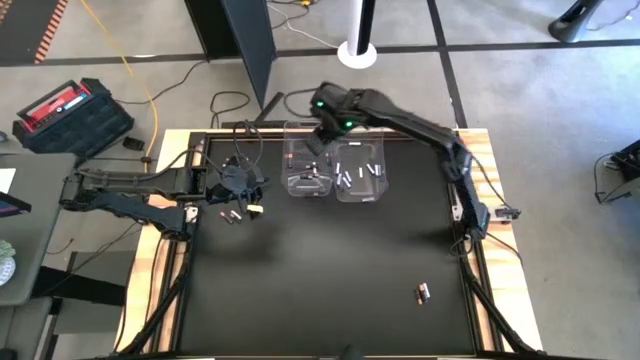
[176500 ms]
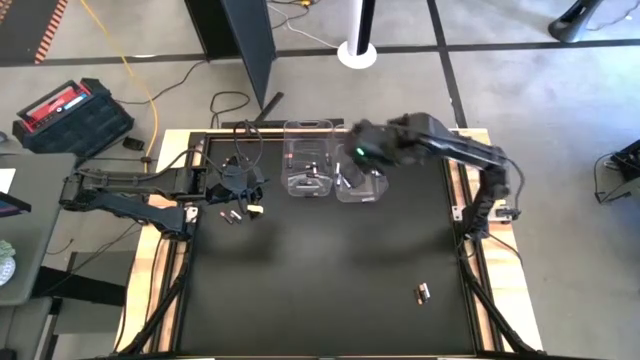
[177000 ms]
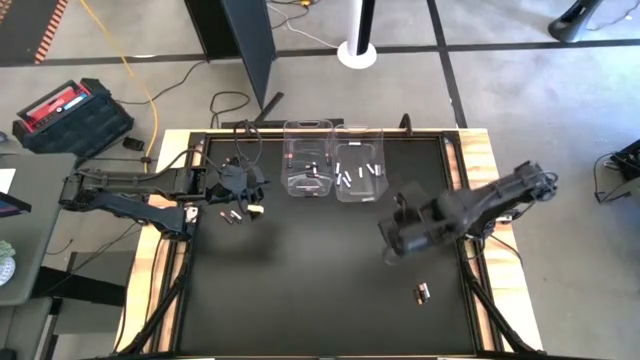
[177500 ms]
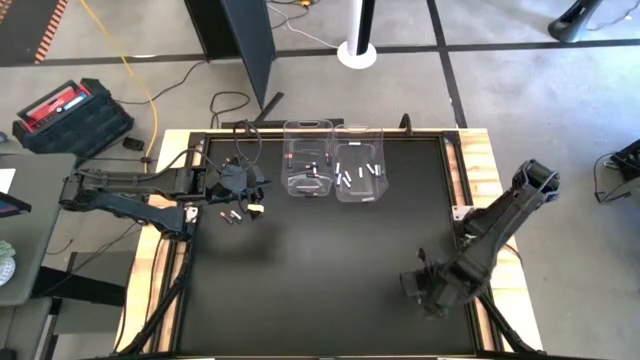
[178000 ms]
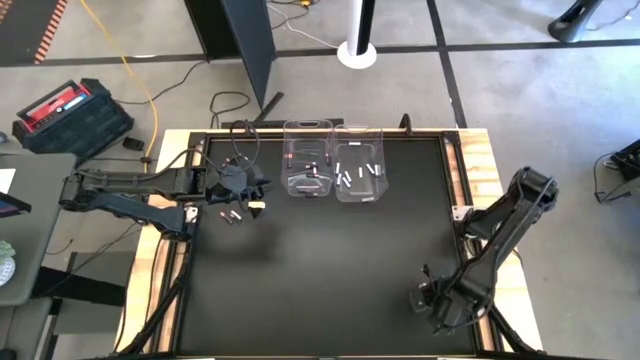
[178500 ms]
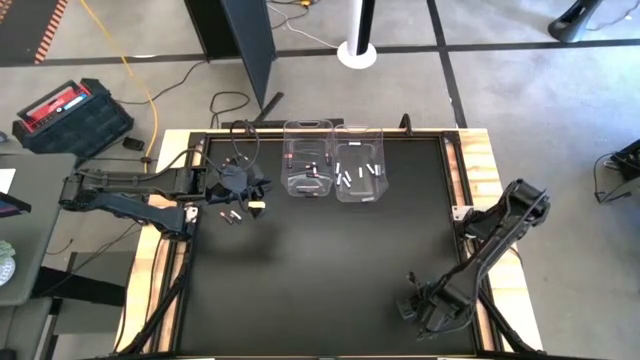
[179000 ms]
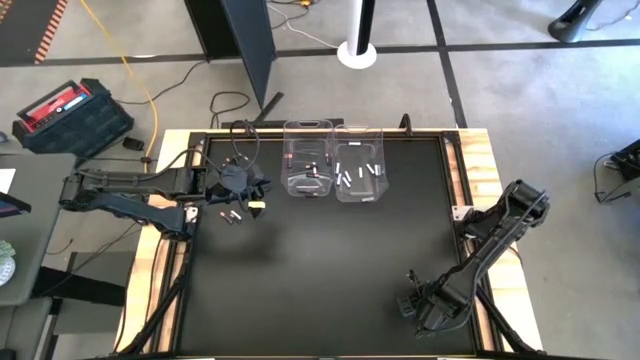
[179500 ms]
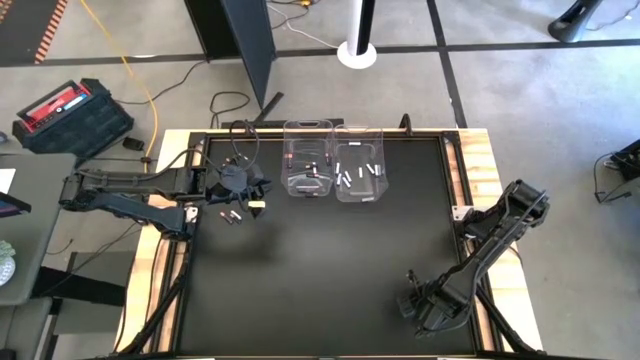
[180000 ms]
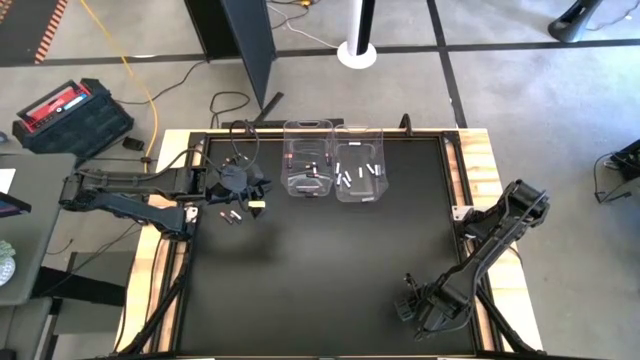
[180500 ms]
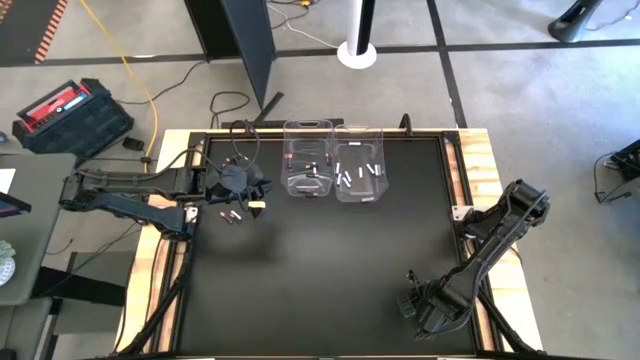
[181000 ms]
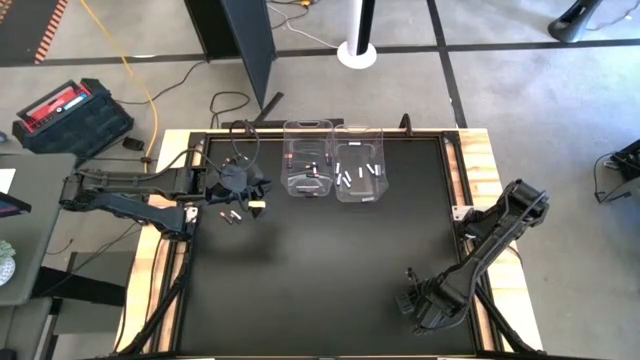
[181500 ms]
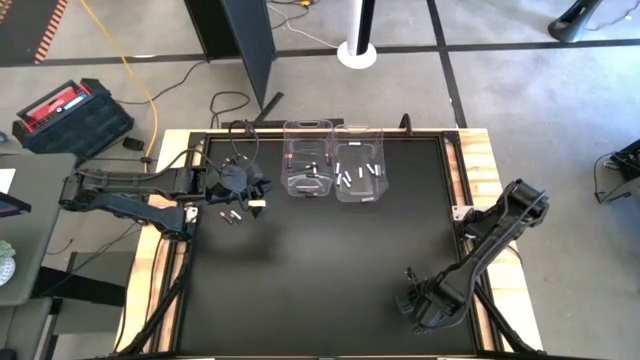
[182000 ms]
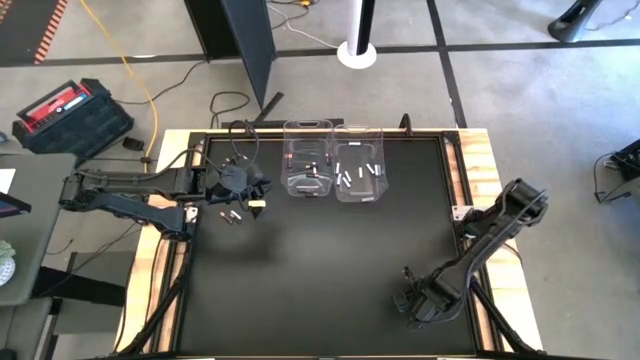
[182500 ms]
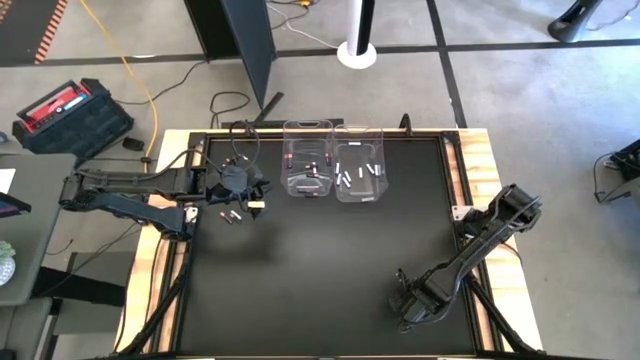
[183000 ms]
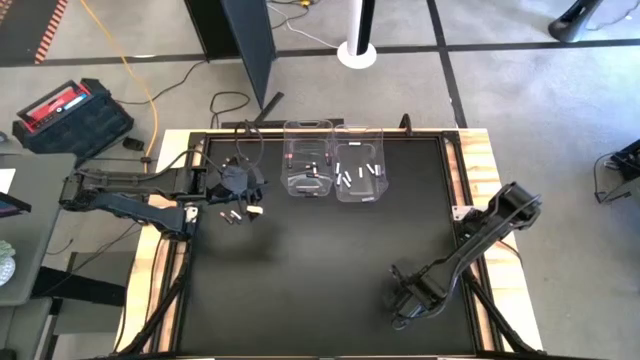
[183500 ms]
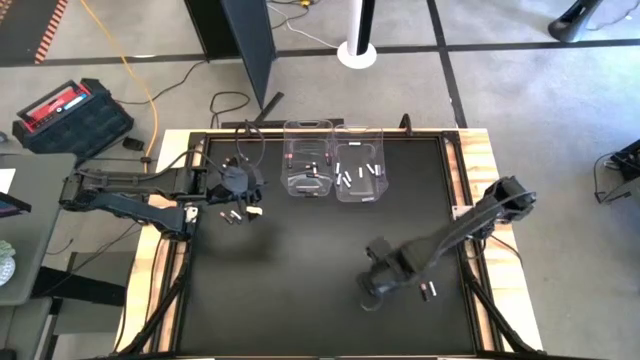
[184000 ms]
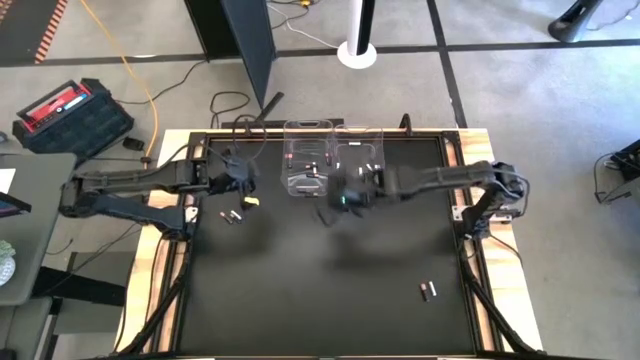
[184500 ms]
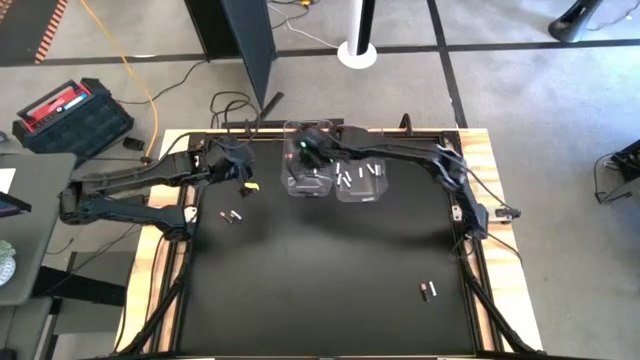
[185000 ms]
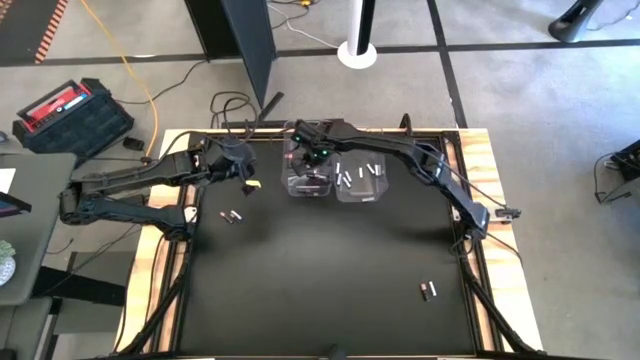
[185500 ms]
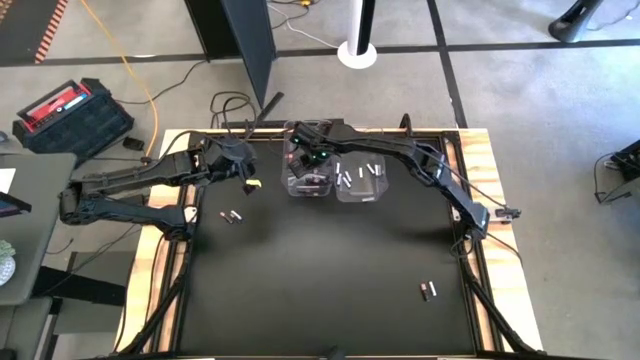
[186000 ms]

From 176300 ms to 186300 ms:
Task: Sort batteries
Put the black battery into the left transparent bin

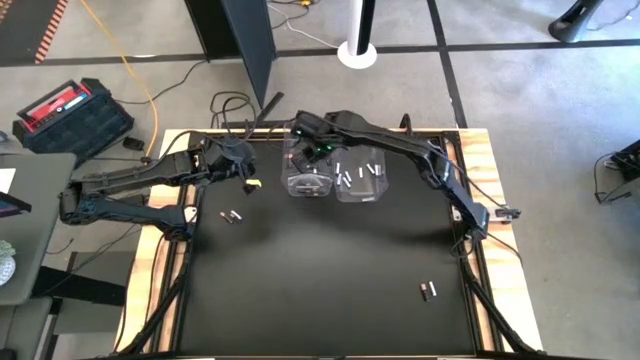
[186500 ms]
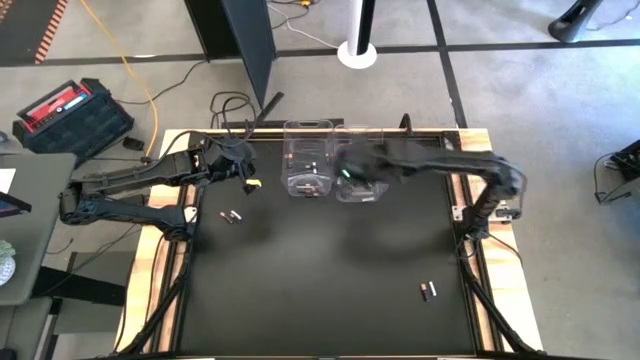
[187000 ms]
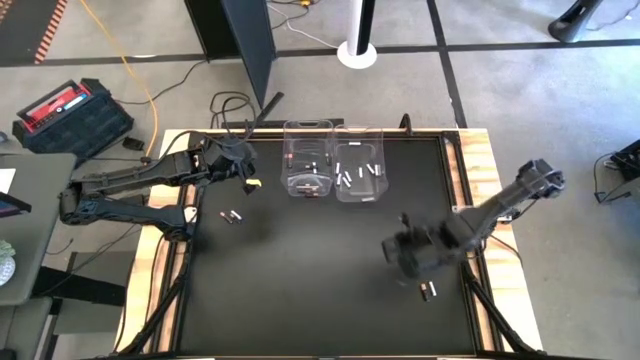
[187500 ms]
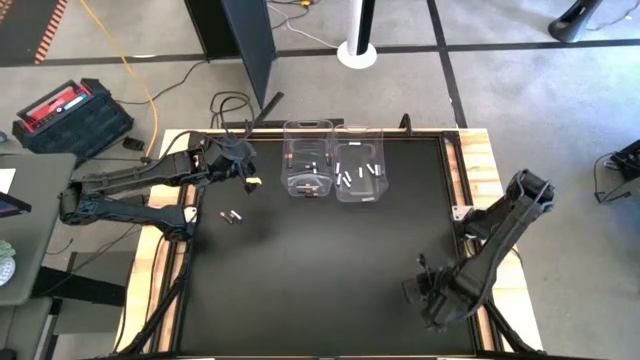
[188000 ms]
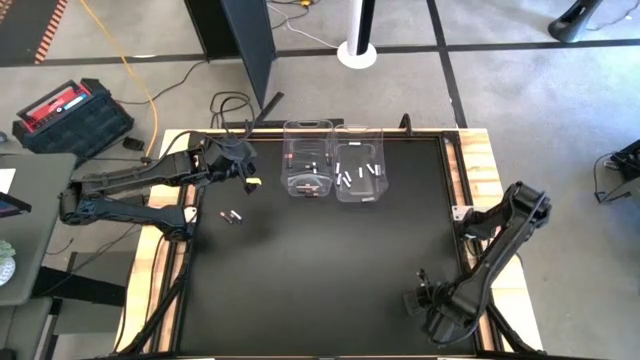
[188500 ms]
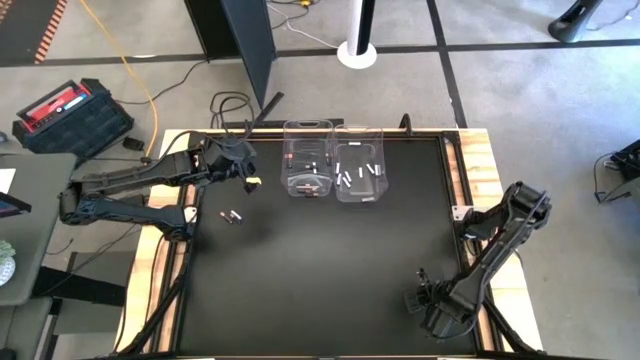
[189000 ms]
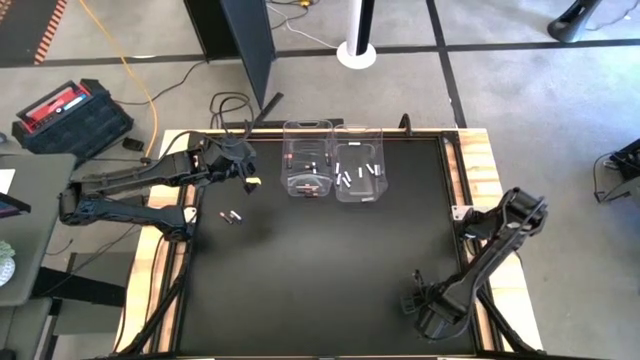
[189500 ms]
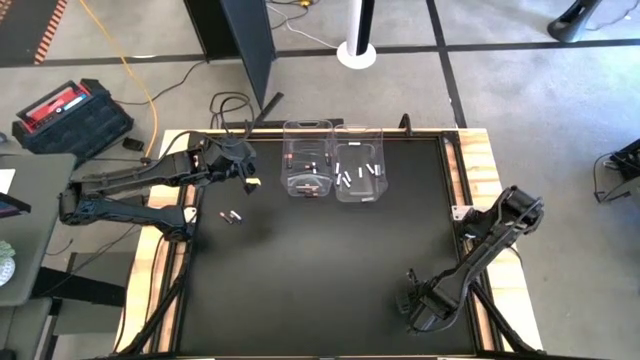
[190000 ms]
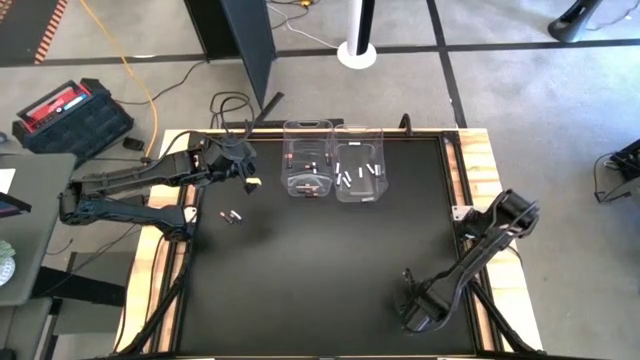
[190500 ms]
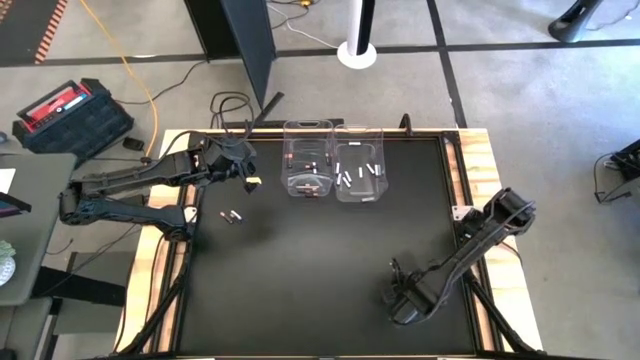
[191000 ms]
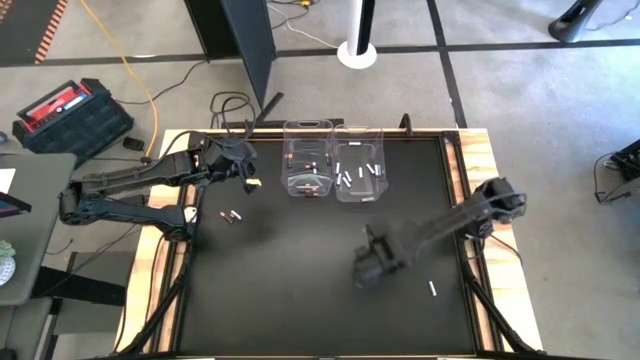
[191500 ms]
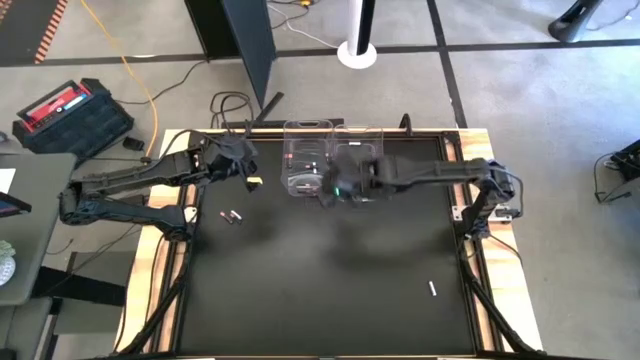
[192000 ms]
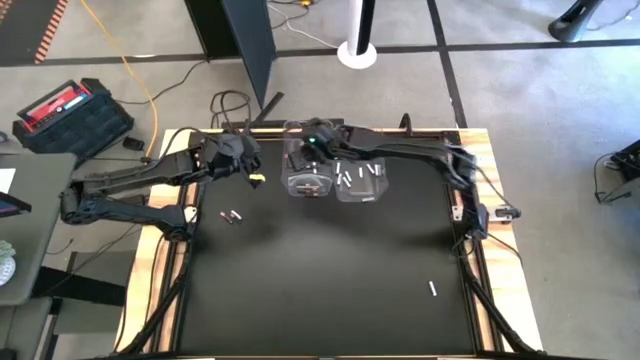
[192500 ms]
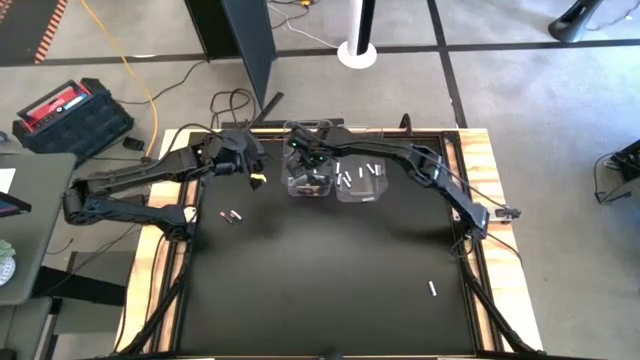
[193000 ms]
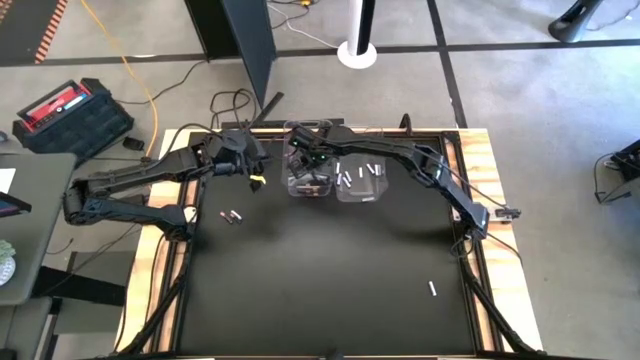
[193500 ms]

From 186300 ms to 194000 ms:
Put the black battery into the left transparent bin

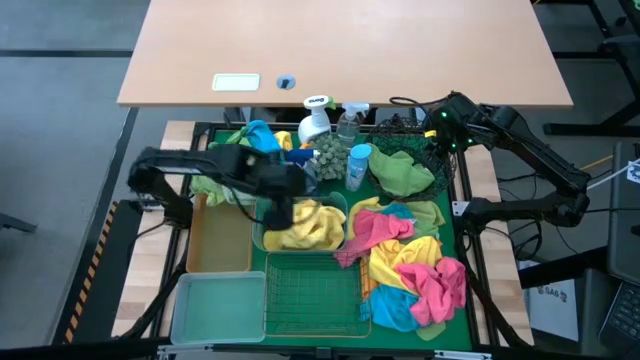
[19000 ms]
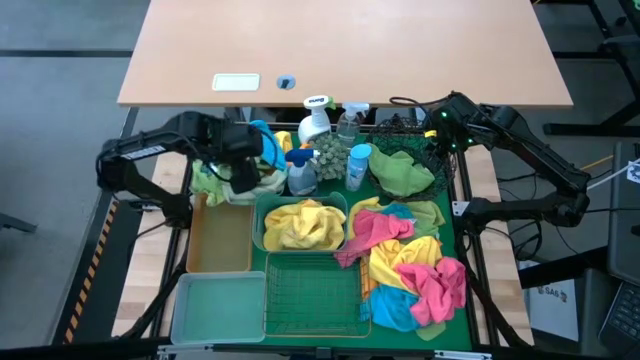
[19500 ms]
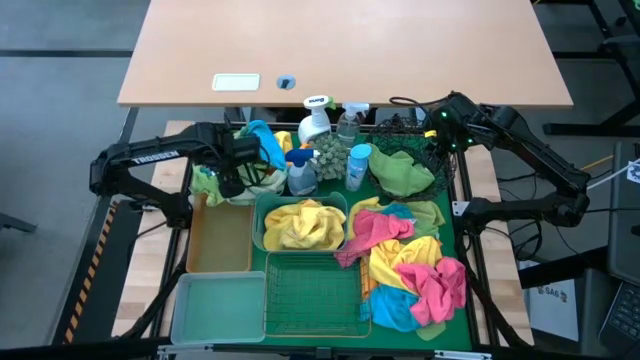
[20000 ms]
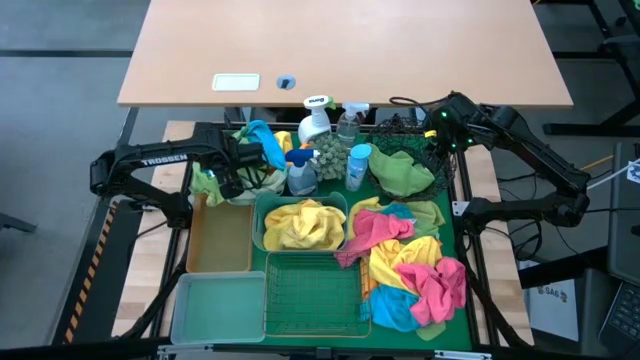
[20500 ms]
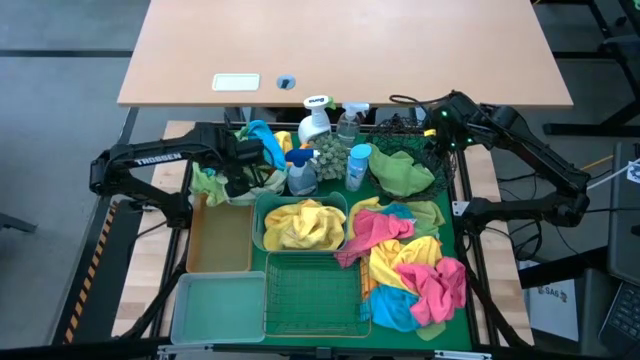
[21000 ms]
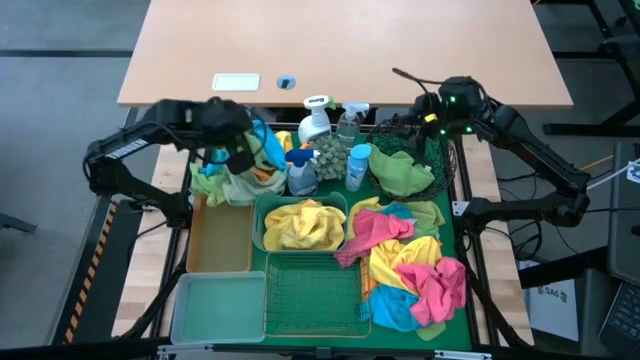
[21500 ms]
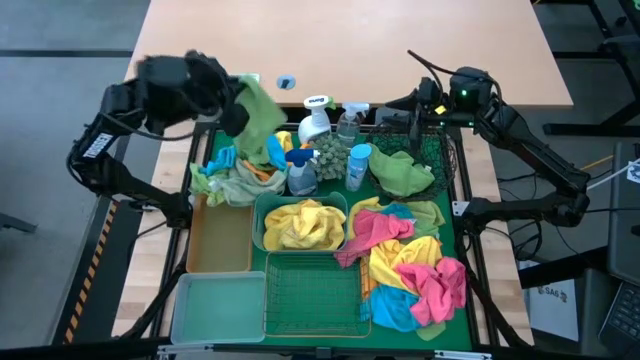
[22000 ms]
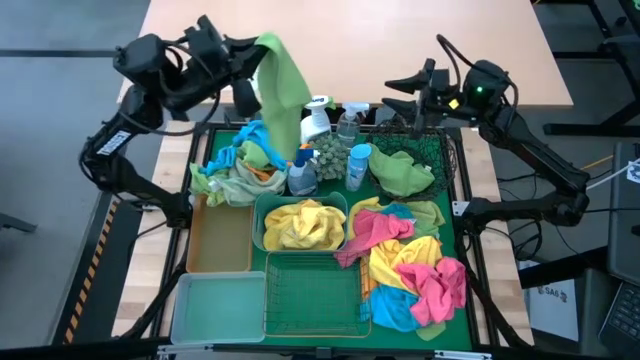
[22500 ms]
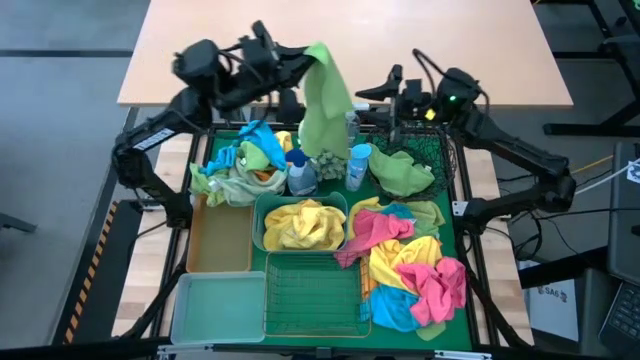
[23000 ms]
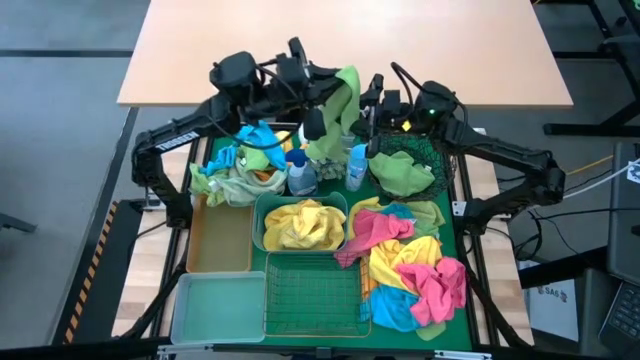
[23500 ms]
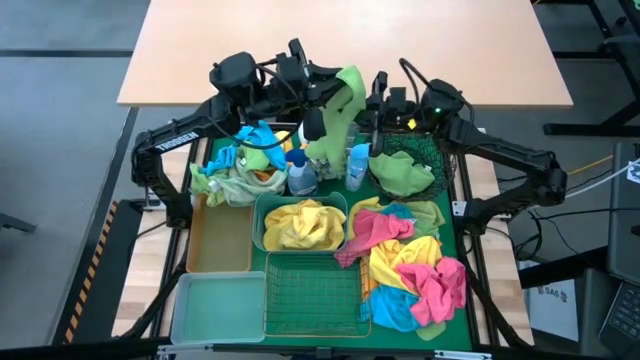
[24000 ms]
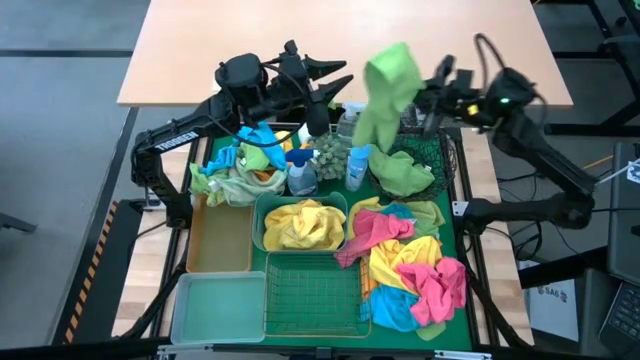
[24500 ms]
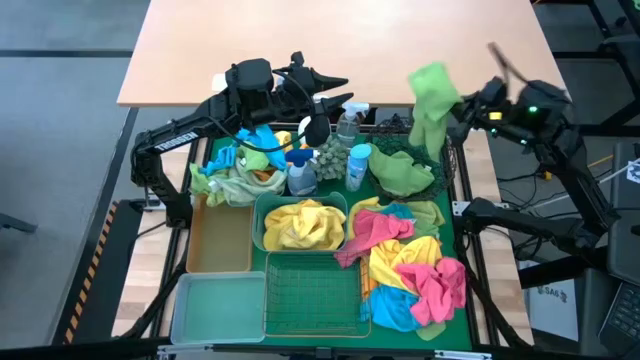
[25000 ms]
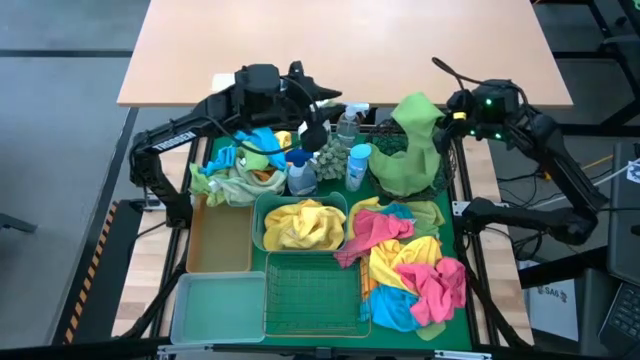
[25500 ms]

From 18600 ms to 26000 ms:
Task: Sort microfiber towel by color & place in baskets
Put the green microfiber towel into the black wire basket
